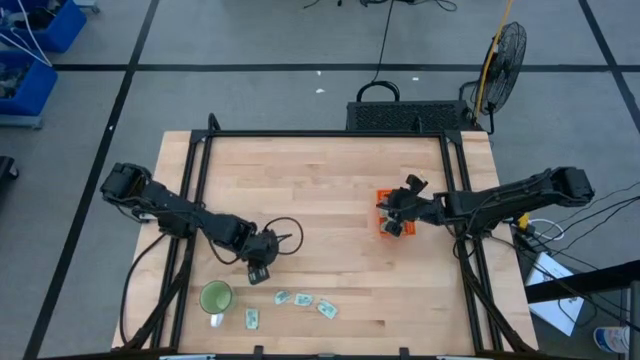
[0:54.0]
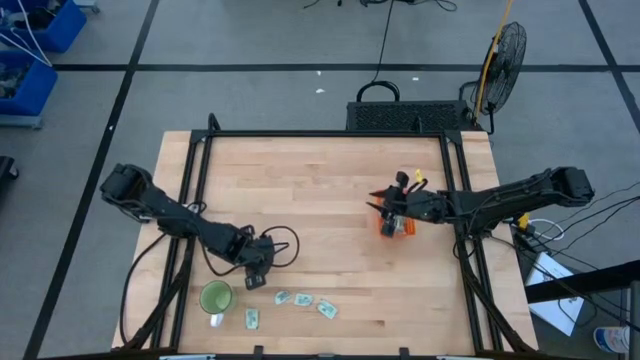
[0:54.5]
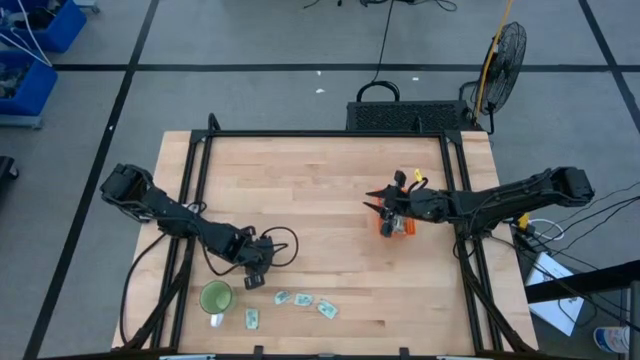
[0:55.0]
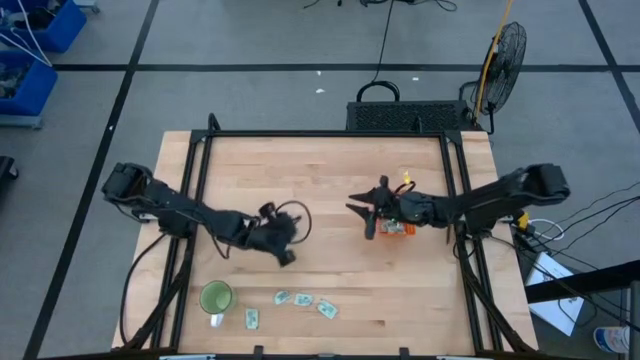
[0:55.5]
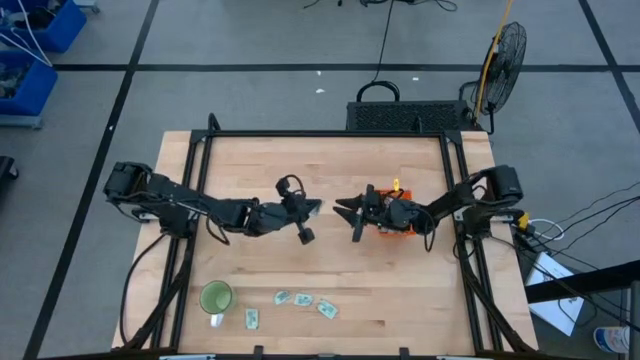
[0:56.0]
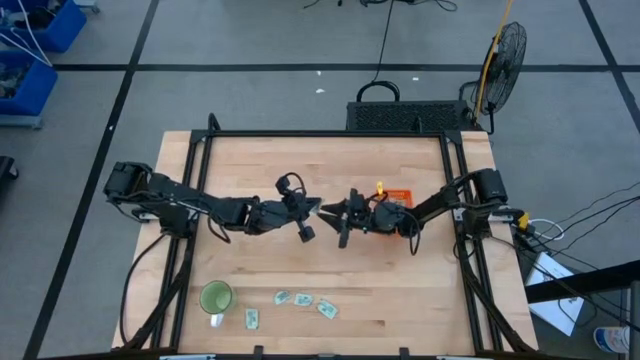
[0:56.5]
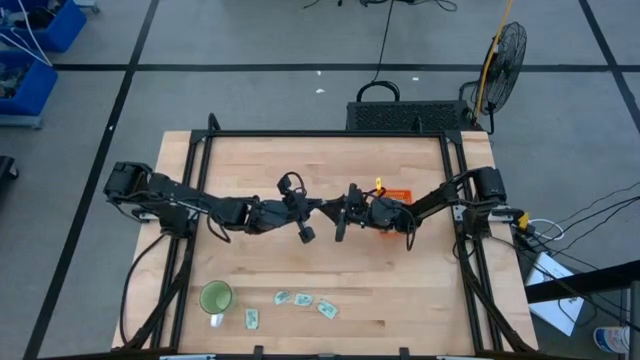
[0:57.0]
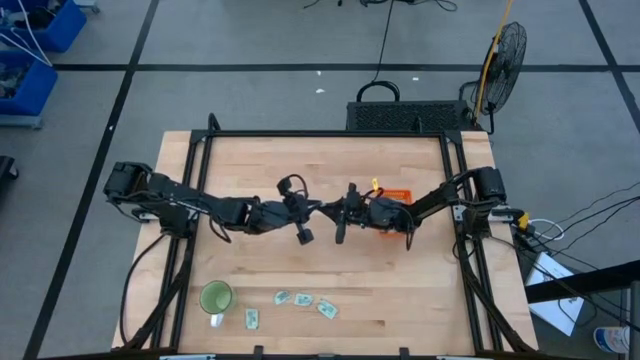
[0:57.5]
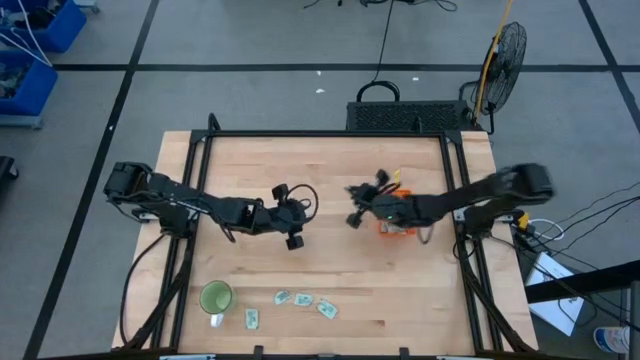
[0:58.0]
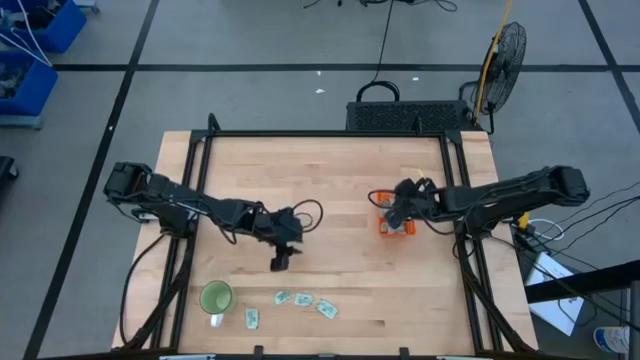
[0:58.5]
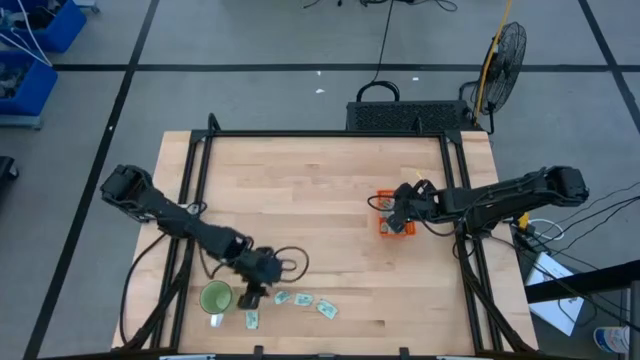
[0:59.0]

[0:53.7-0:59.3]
Task: Pick and place Stevia / Truvia into bins
Put the stevia packet into the orange basket

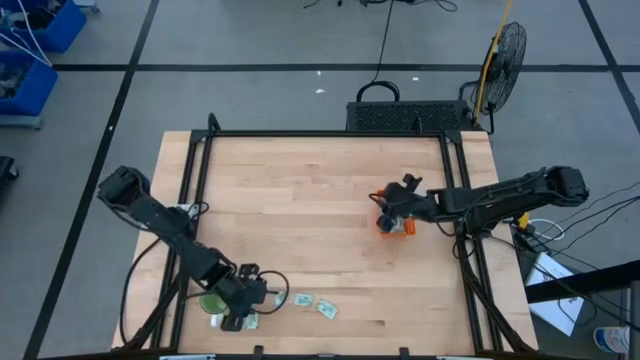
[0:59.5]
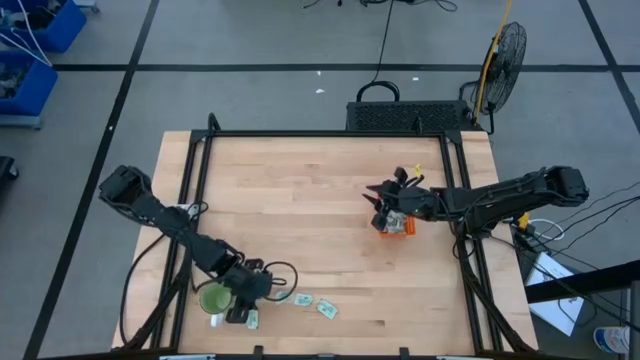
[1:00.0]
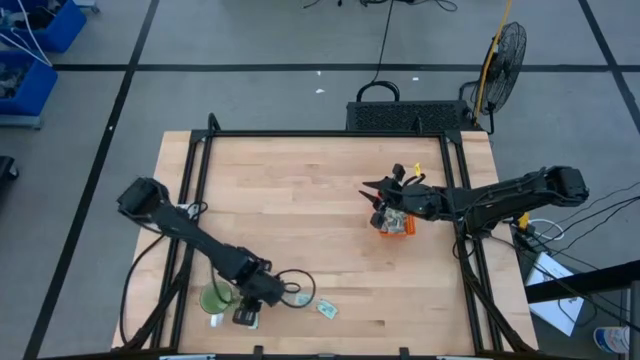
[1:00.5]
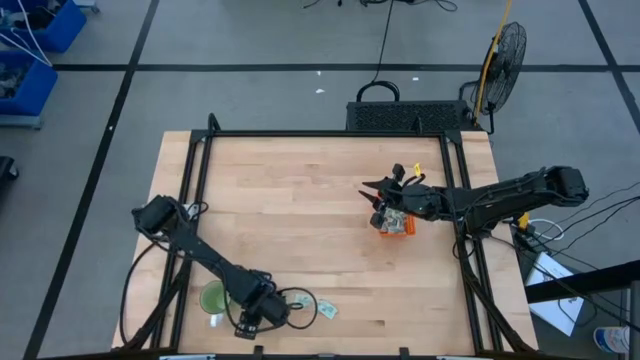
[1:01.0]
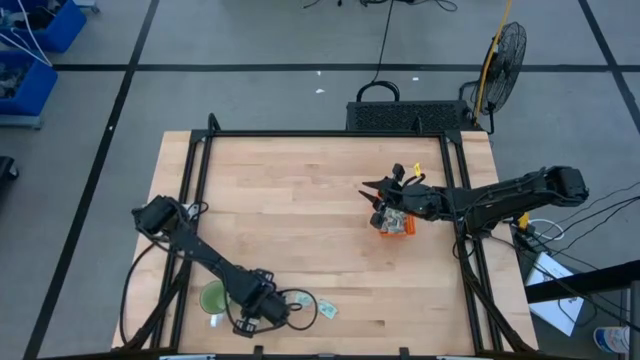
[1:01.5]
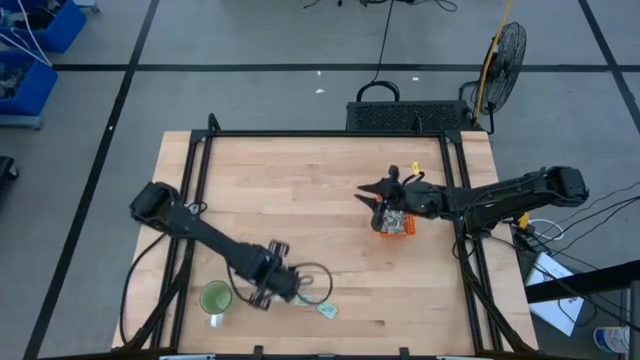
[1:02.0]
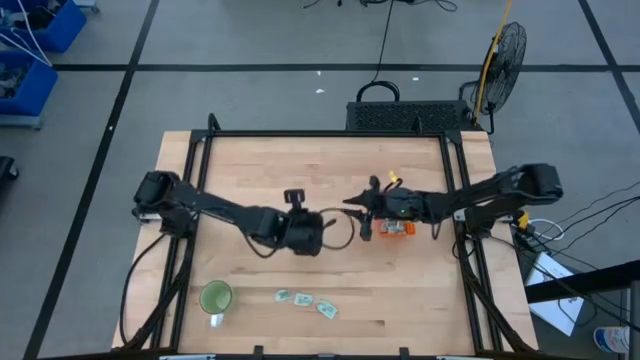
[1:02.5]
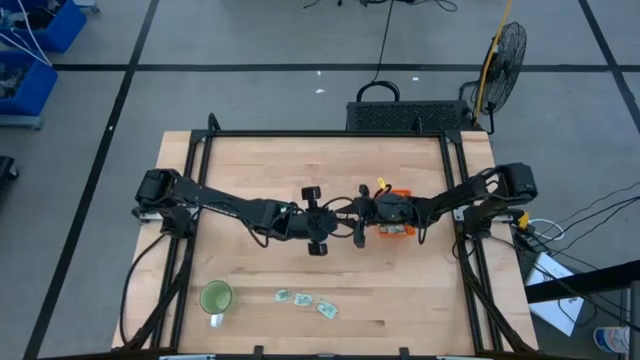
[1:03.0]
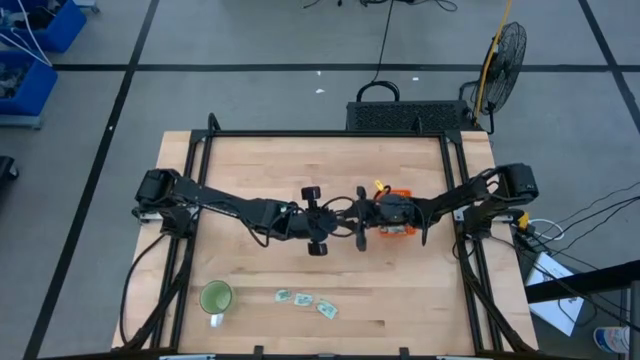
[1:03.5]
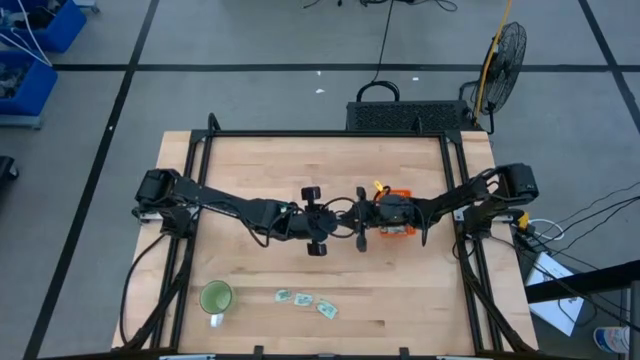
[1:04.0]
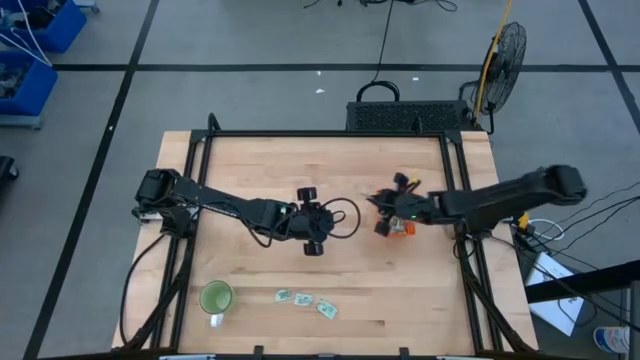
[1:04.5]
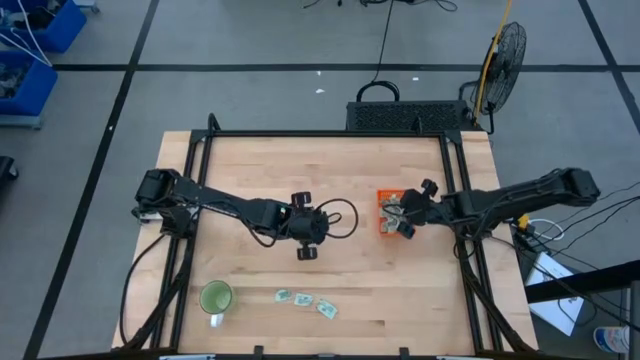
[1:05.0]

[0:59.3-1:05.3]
Put the stevia packet into the orange basket

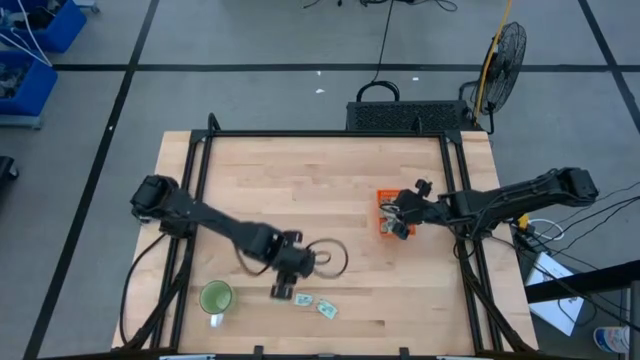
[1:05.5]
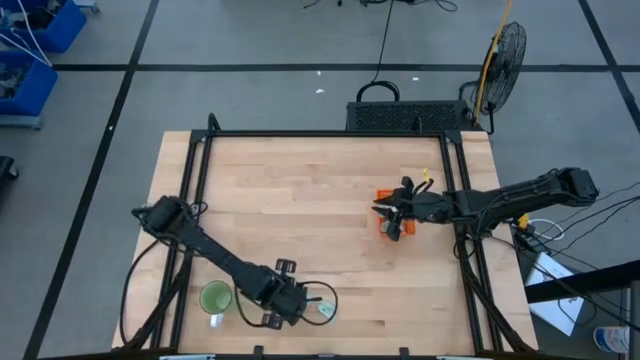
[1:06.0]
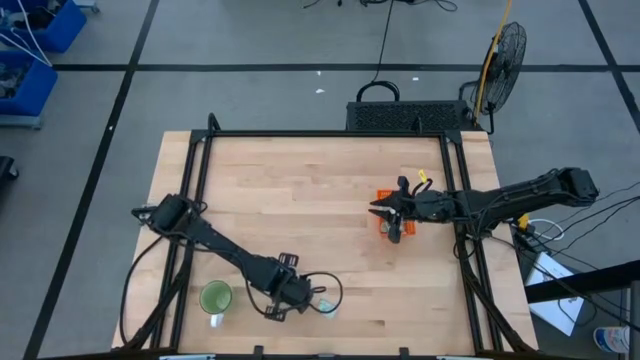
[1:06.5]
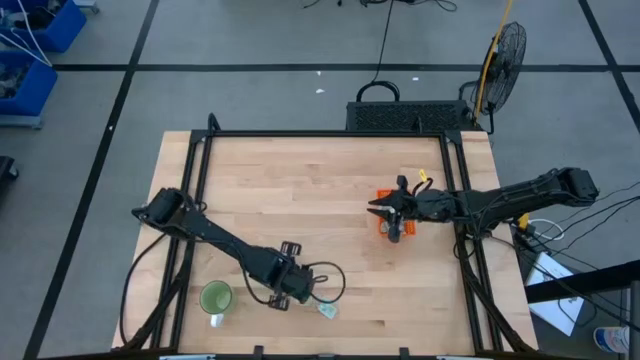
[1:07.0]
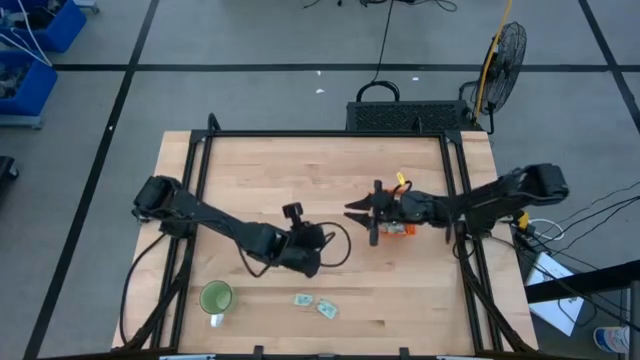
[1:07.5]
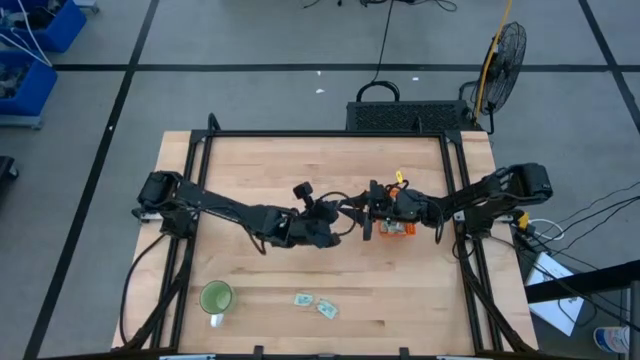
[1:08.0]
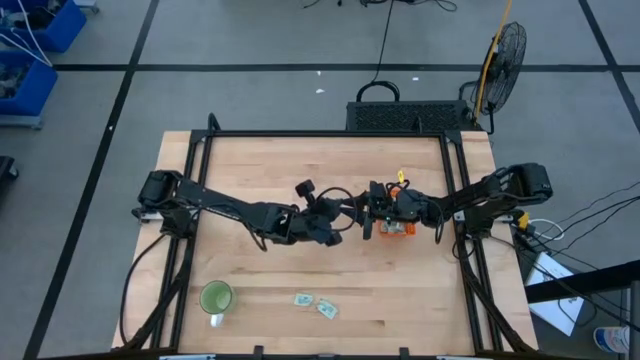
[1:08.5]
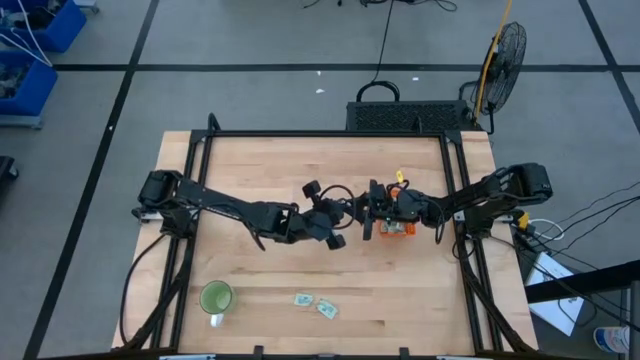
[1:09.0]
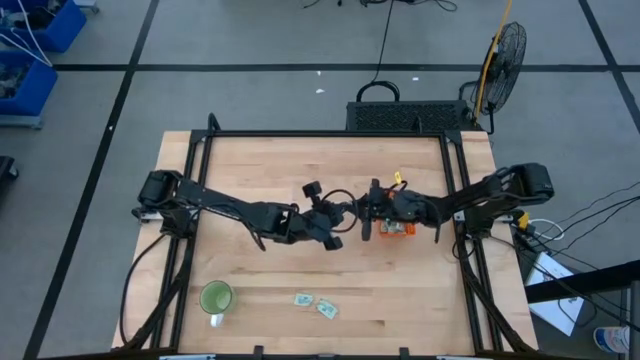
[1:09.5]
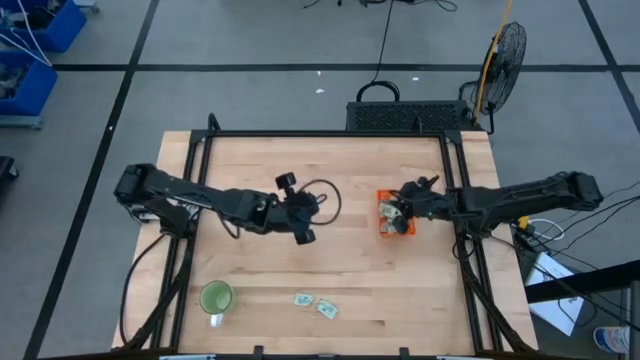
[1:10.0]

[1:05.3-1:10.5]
Put the stevia packet into the orange basket

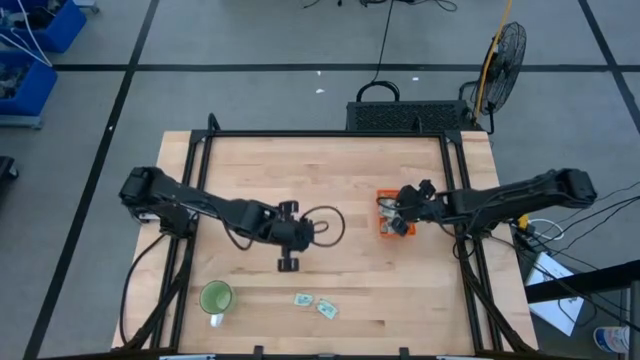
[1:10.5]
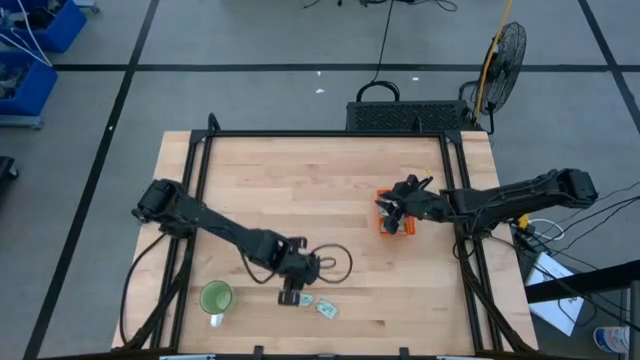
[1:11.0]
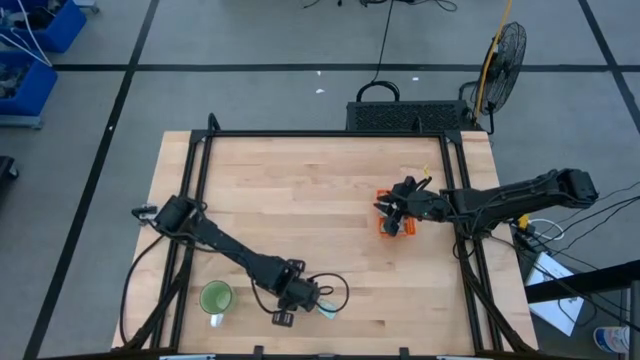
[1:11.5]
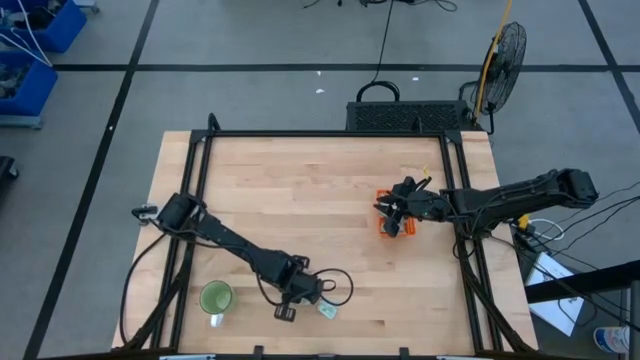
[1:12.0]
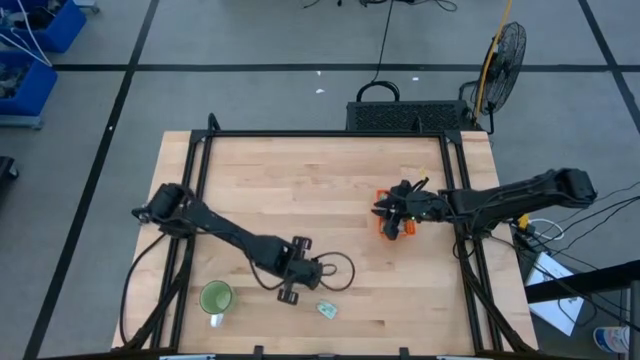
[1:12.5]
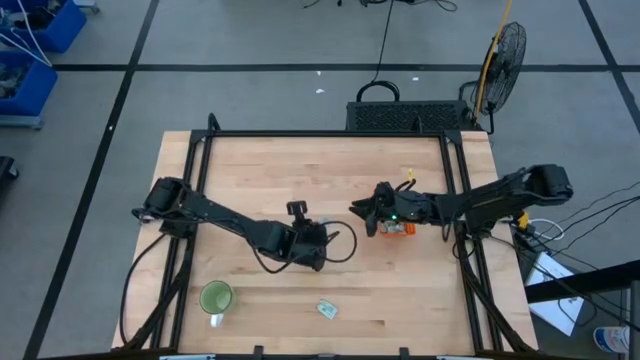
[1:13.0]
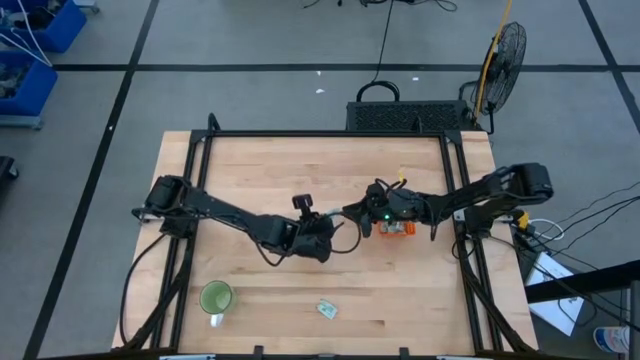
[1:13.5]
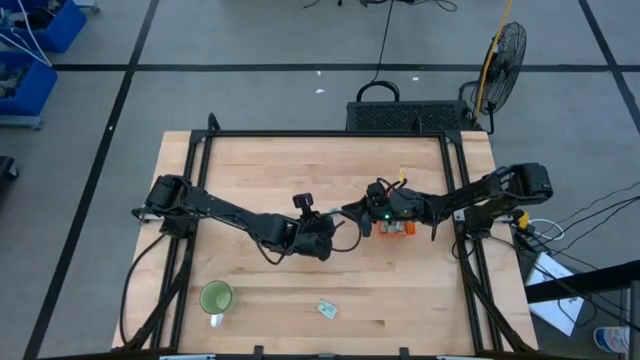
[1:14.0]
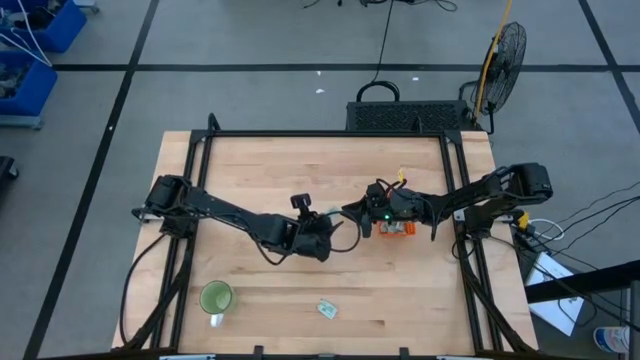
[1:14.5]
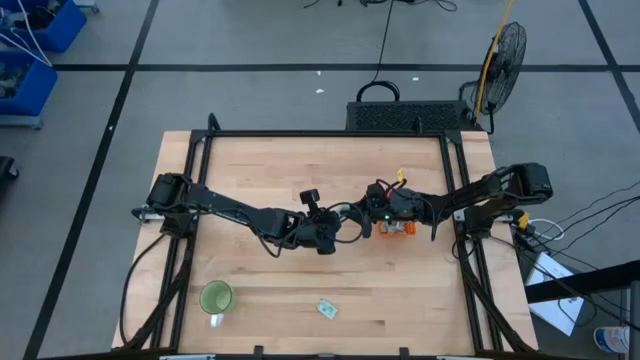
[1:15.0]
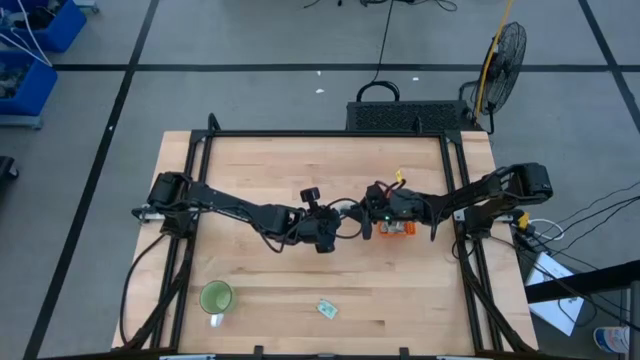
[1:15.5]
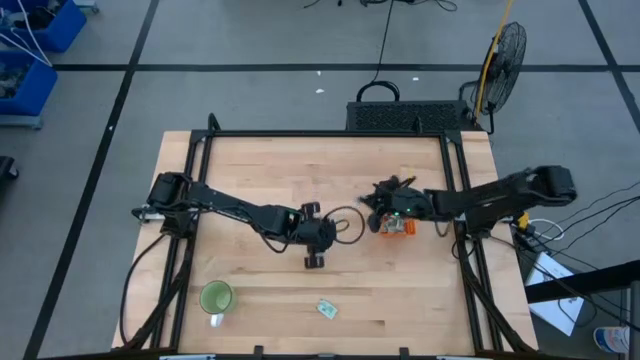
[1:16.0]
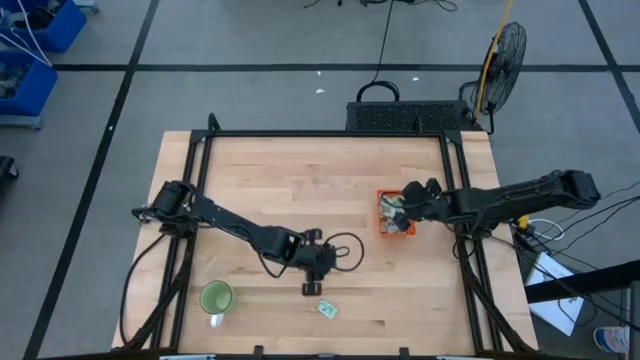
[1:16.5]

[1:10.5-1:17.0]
Put the stevia packet into the orange basket
